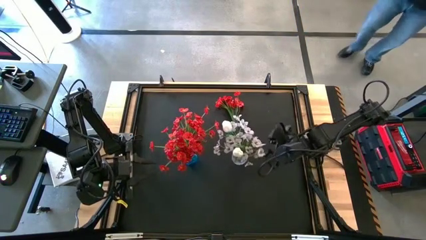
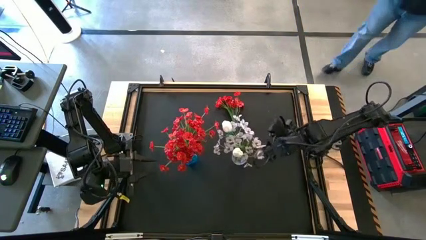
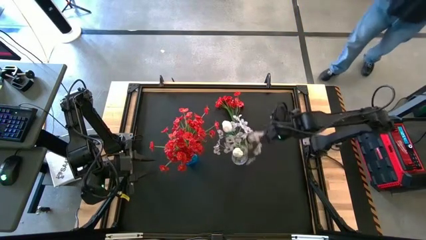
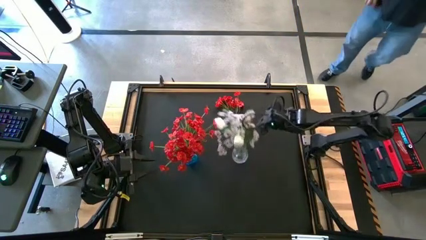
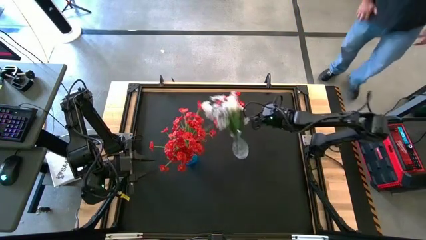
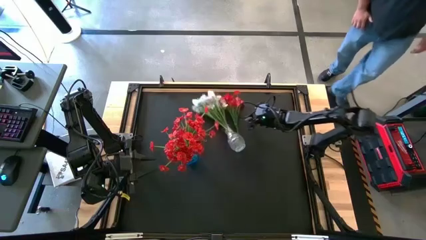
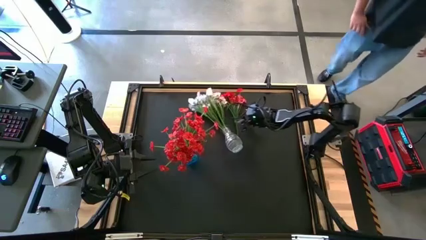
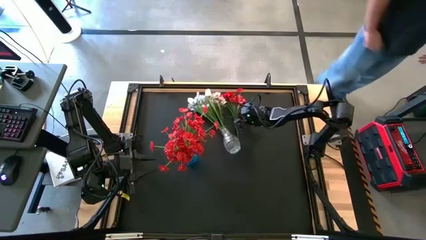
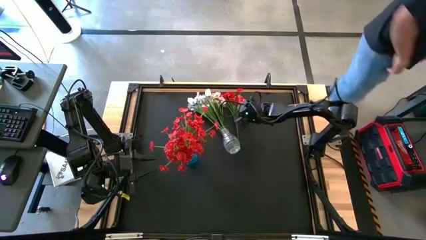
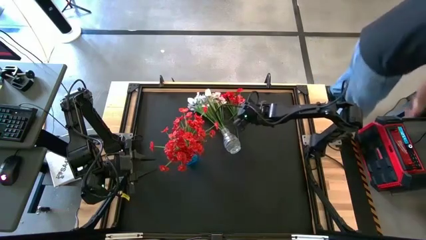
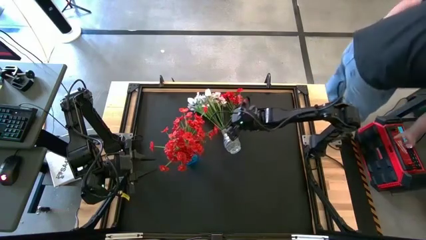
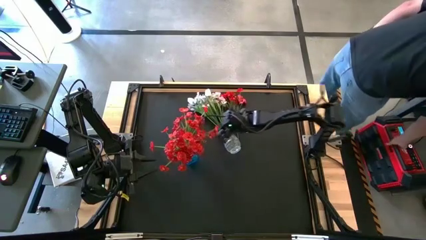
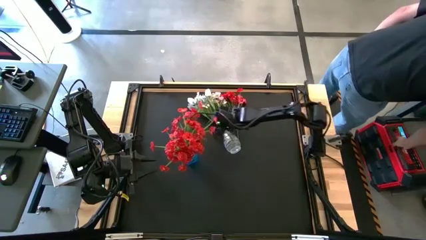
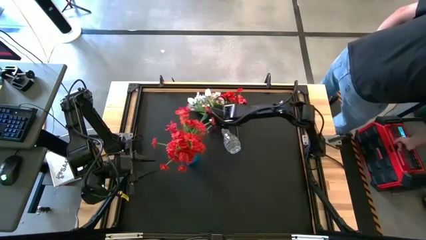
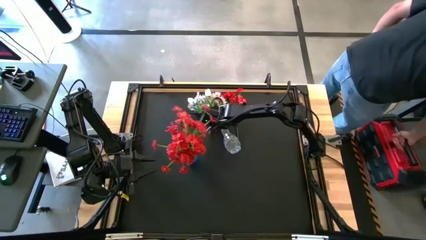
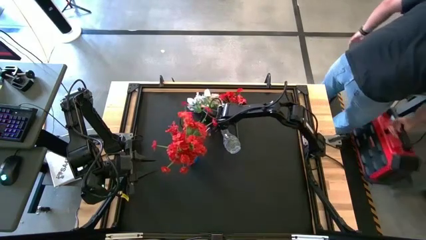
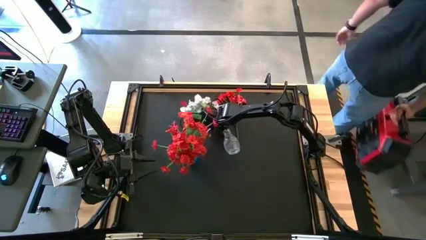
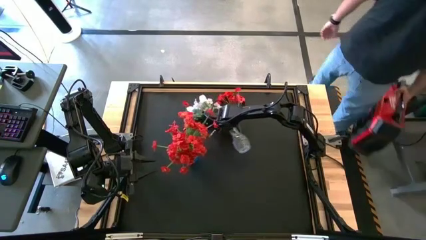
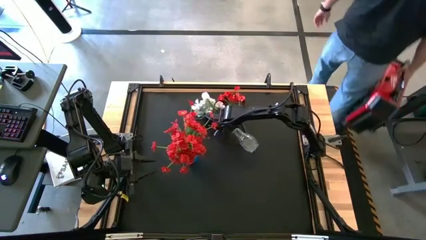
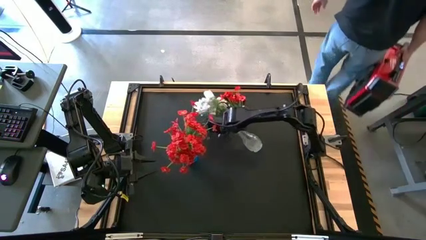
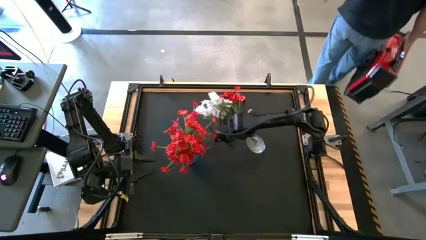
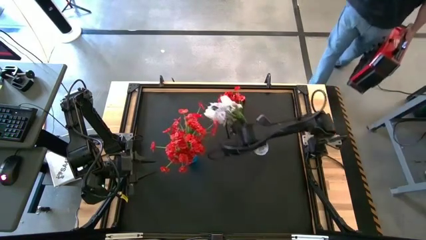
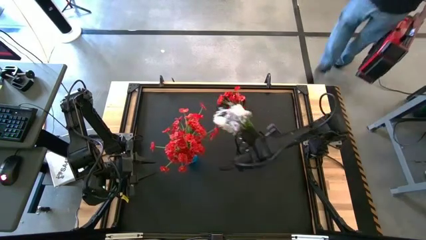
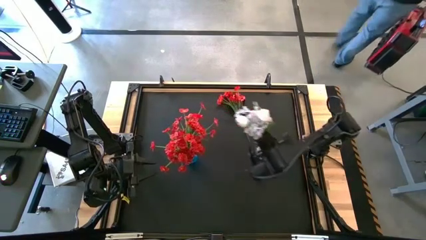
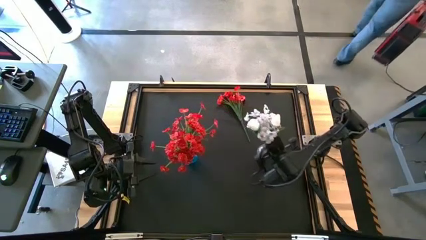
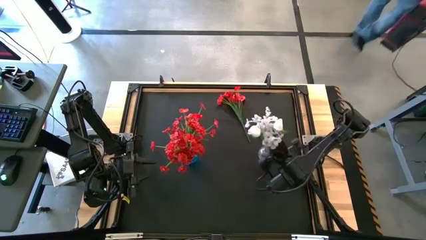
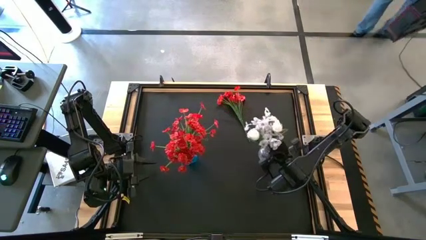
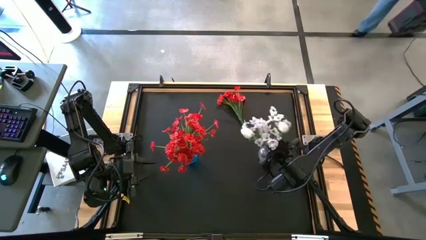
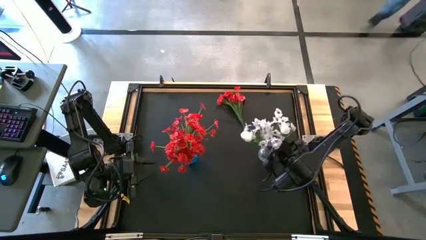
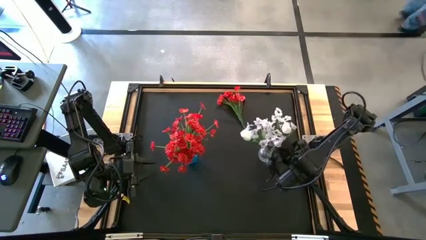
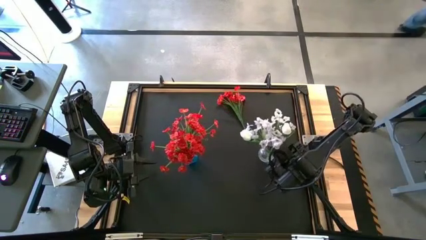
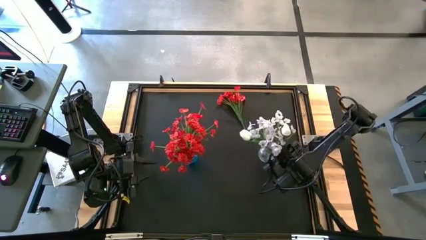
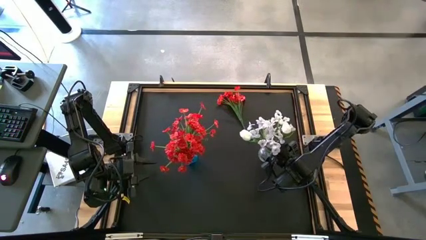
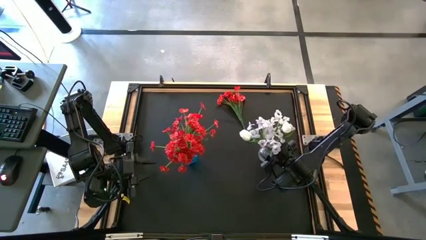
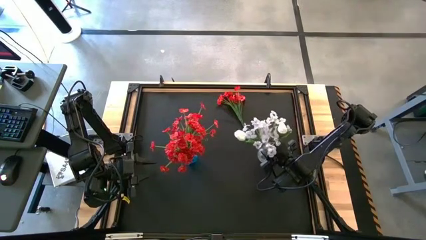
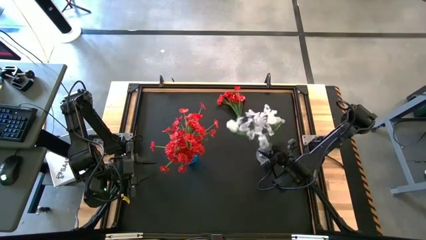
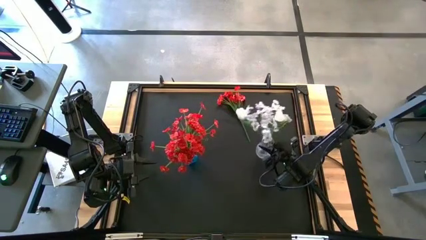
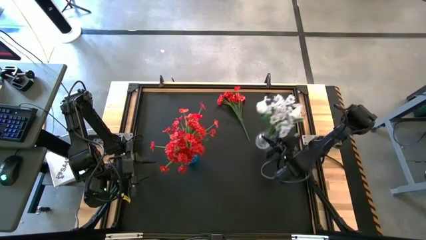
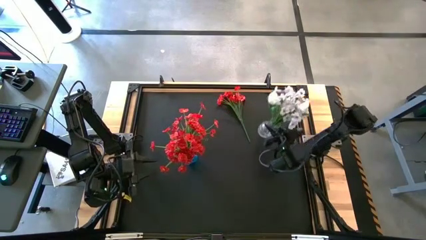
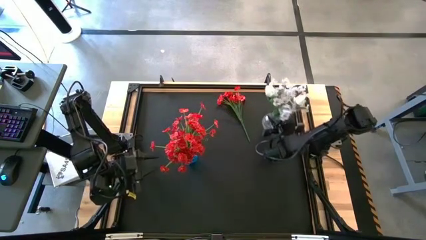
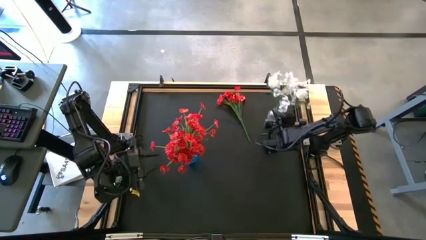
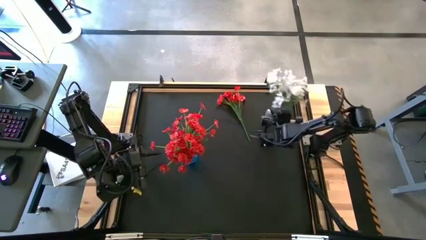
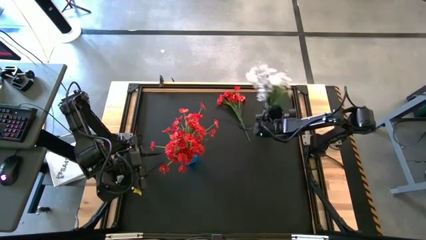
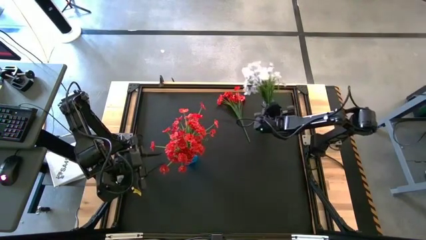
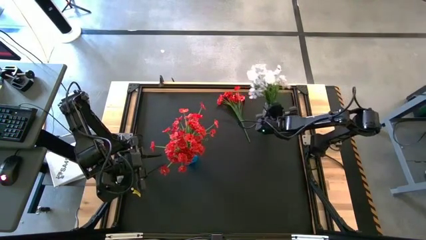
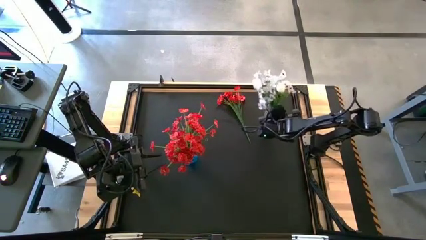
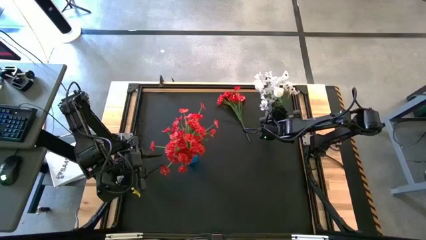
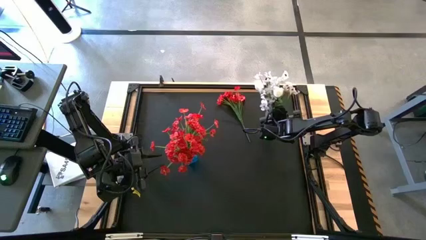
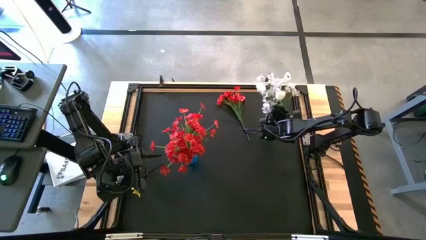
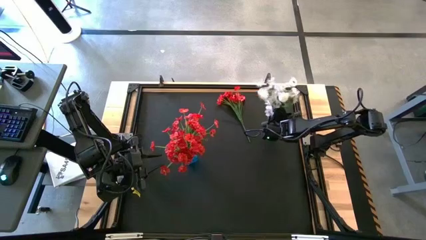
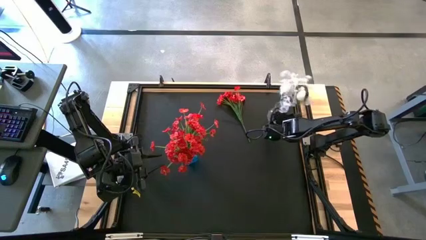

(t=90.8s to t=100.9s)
Task: Sort flowers into vase by color
Adjust the transparent vase

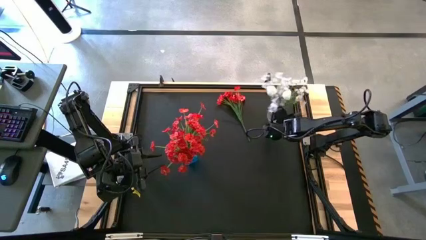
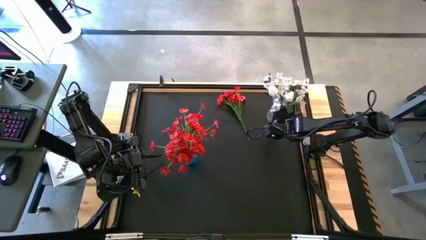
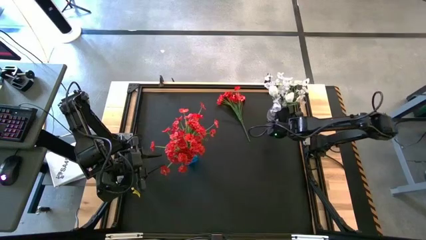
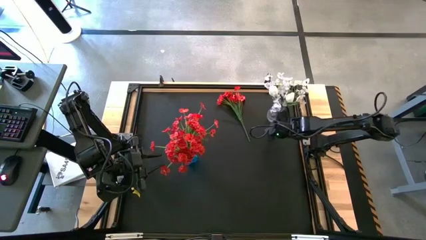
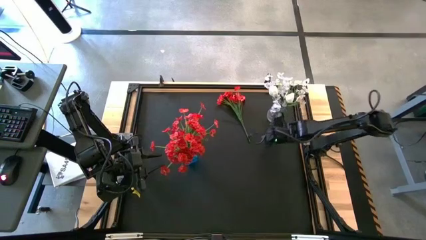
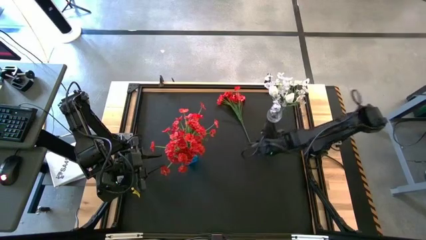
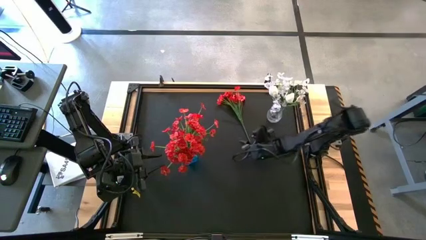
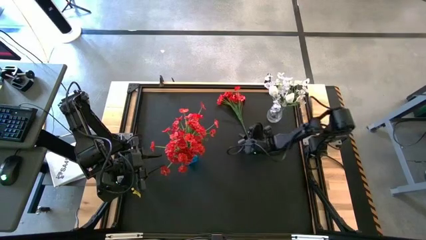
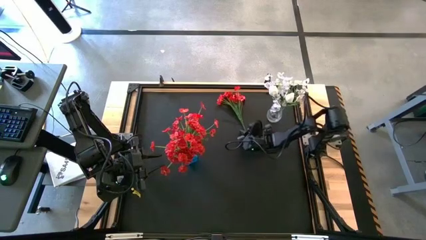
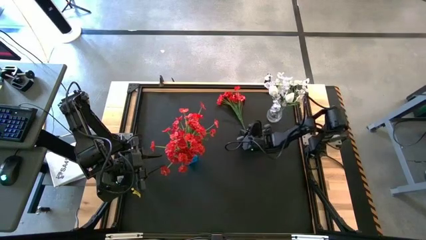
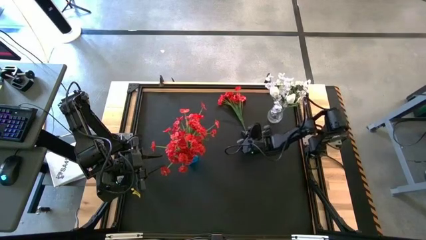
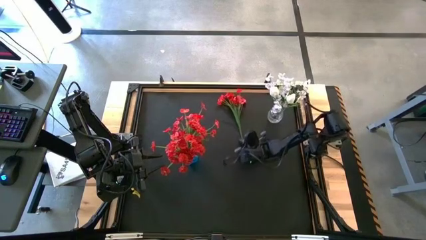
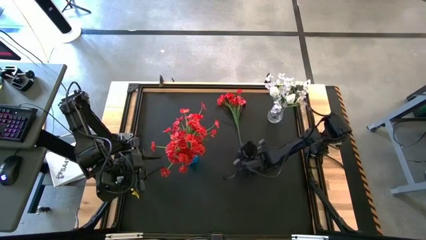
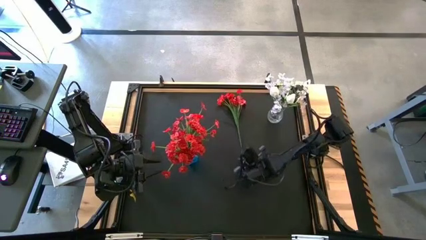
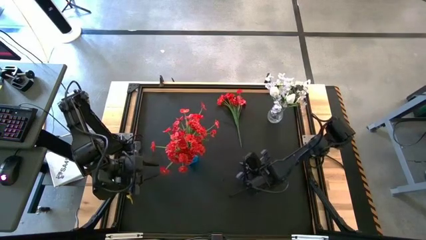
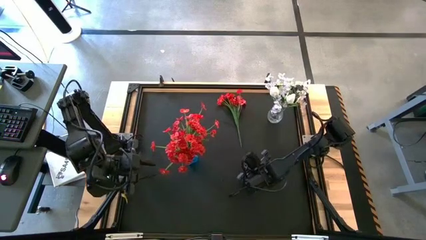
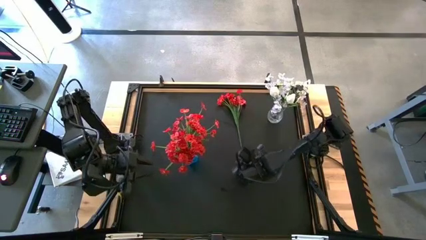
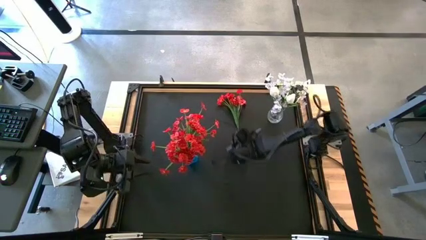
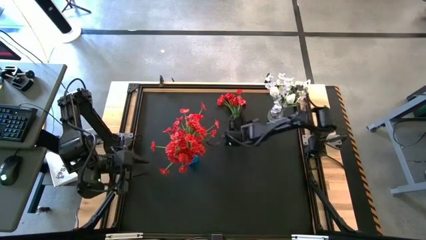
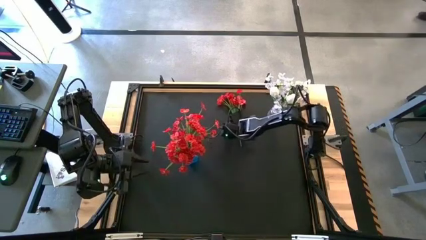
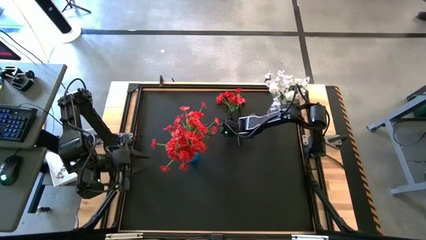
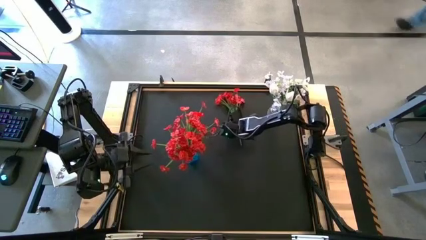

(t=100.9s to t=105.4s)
Put the red flowers into the blue vase

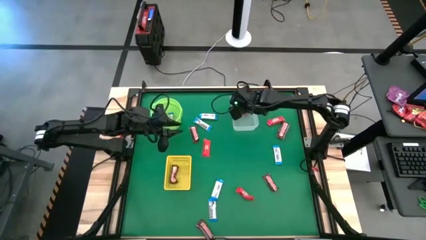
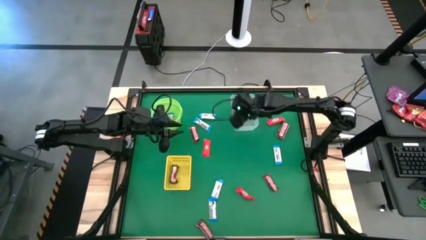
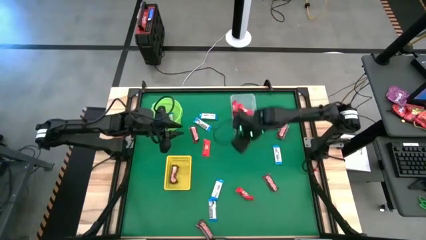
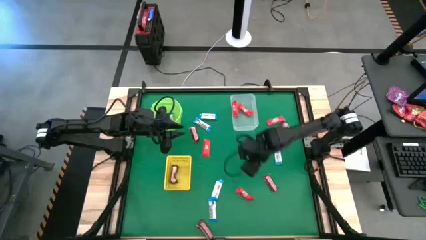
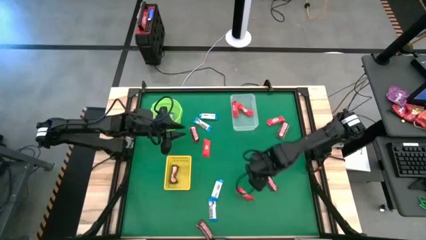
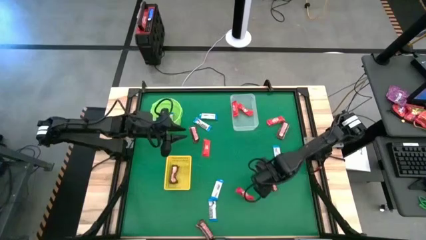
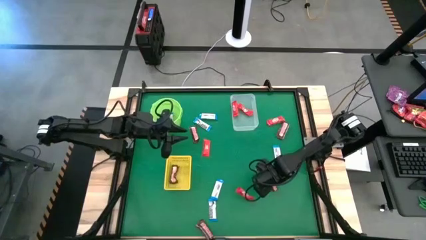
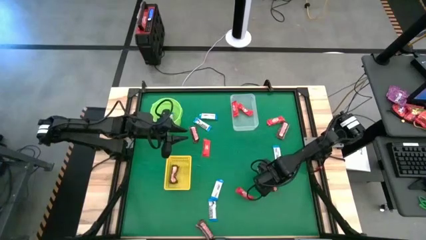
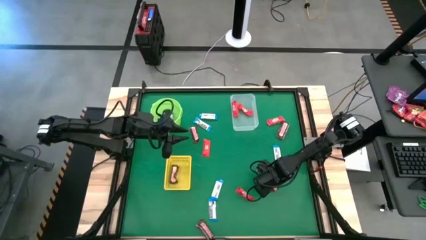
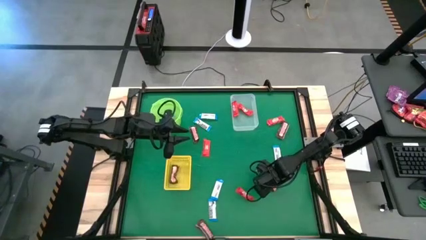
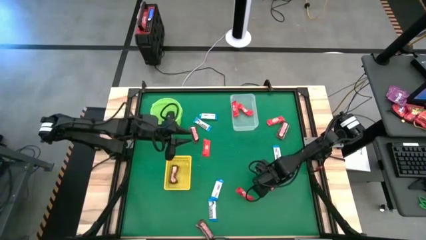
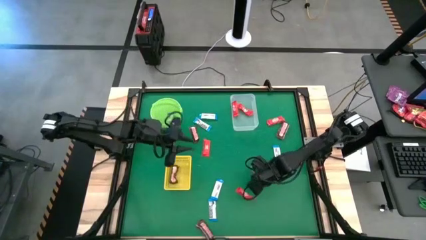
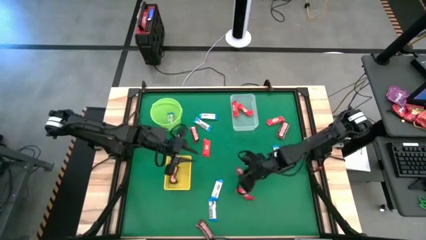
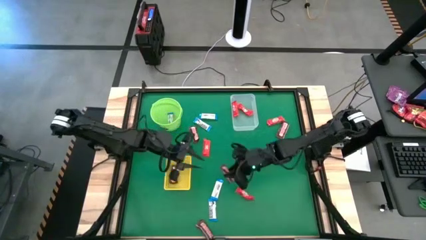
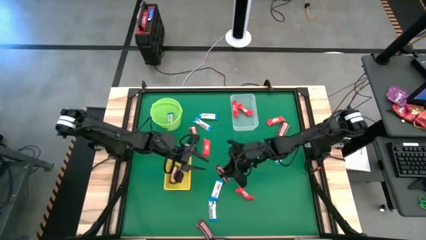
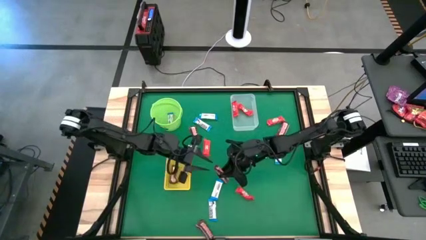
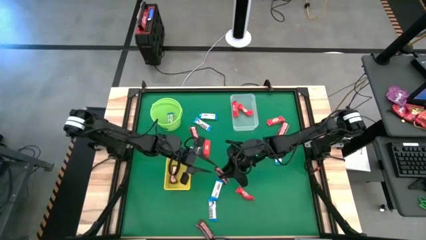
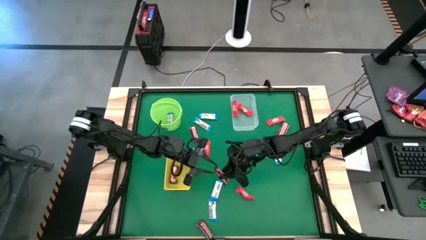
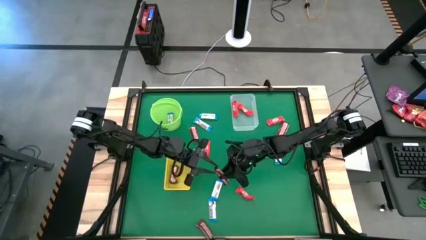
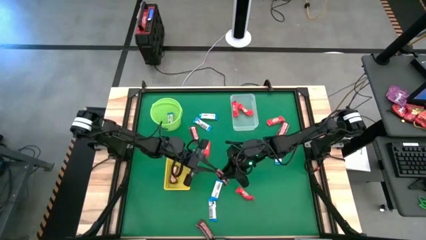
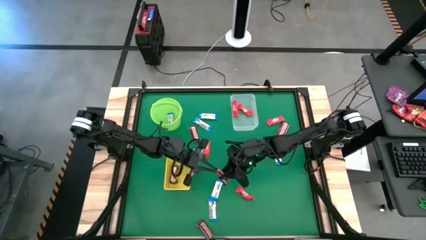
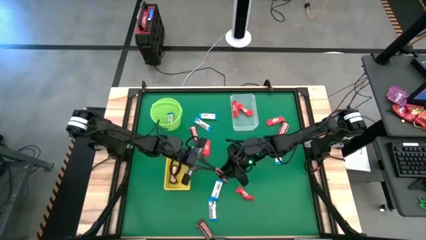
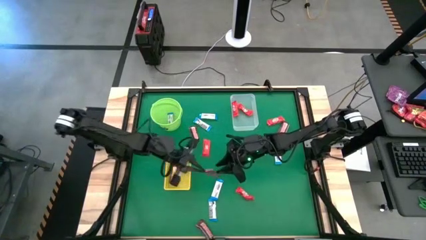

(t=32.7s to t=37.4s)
Task: Sort candy by brand, put in halloween buckets
Put the brown chocolate into the yellow bin
